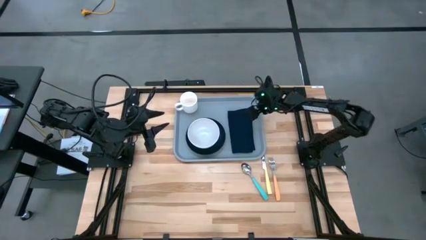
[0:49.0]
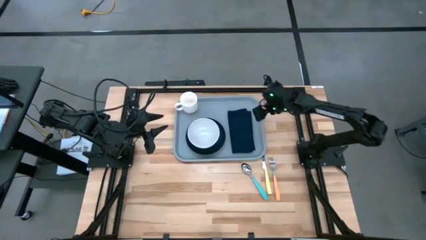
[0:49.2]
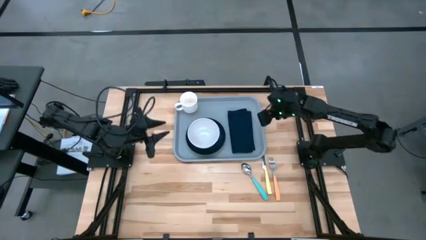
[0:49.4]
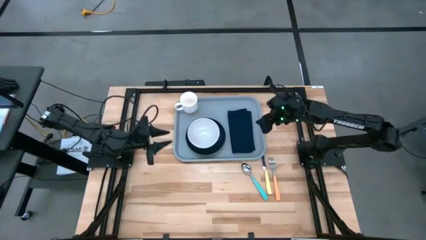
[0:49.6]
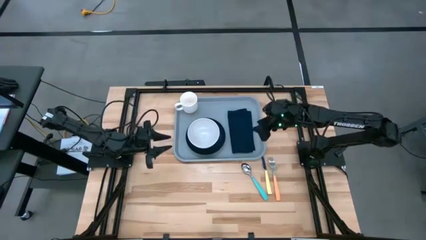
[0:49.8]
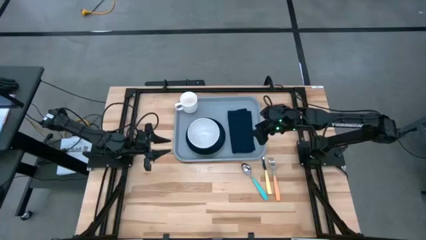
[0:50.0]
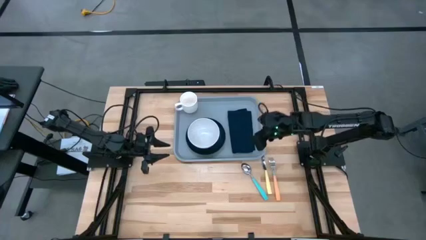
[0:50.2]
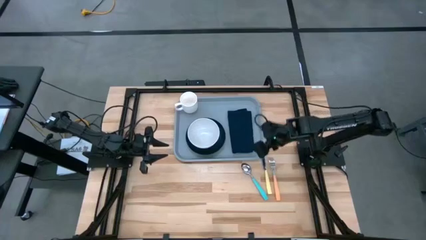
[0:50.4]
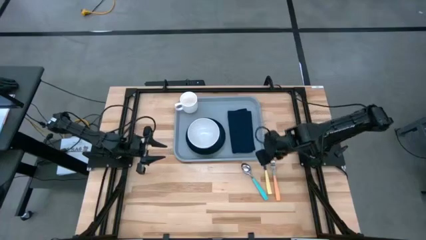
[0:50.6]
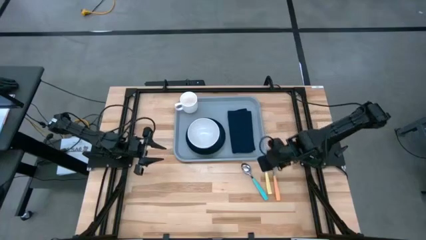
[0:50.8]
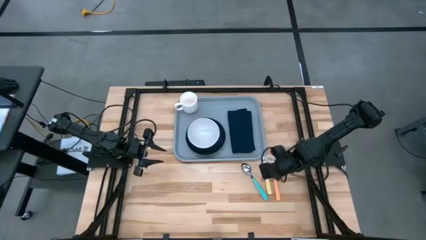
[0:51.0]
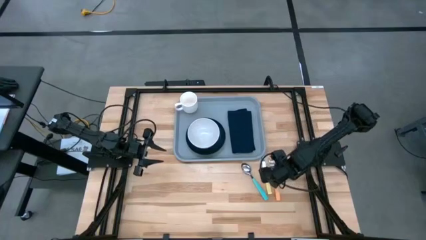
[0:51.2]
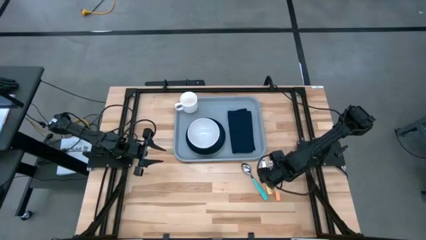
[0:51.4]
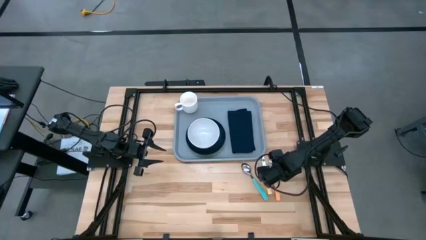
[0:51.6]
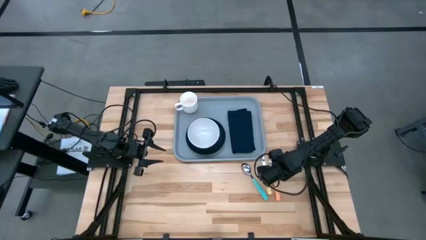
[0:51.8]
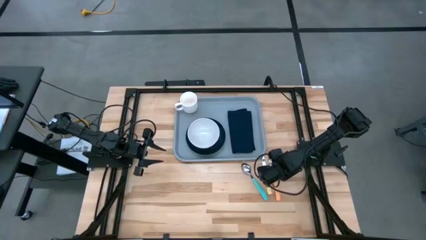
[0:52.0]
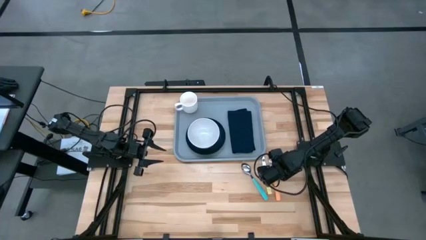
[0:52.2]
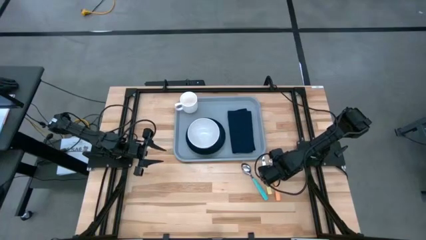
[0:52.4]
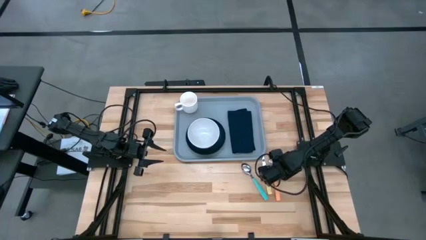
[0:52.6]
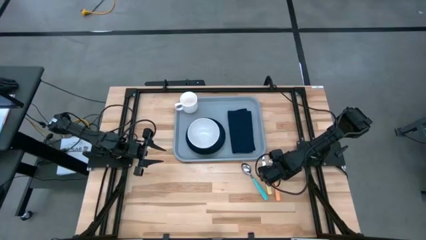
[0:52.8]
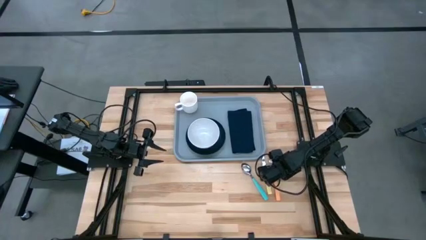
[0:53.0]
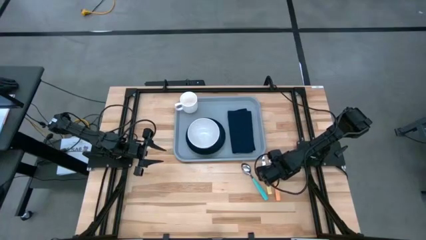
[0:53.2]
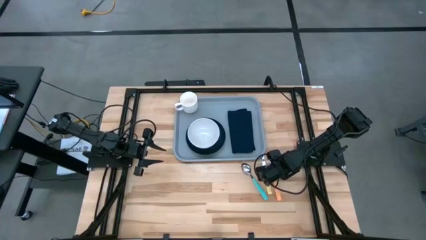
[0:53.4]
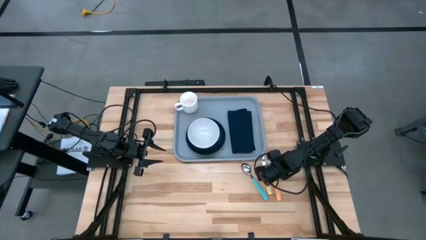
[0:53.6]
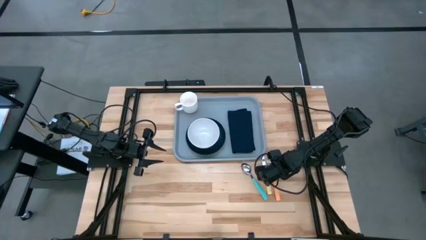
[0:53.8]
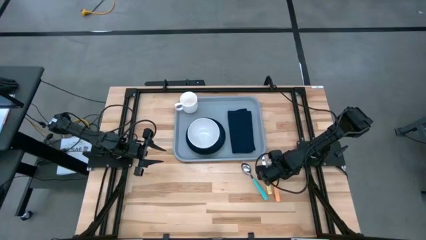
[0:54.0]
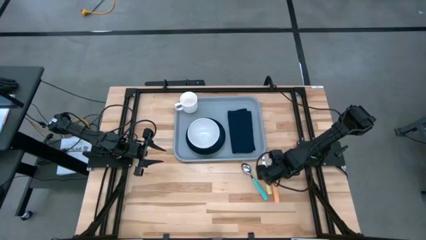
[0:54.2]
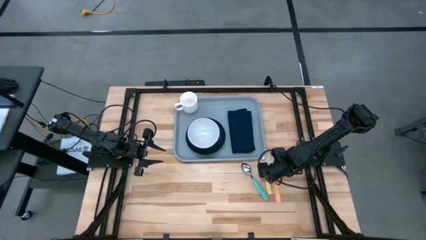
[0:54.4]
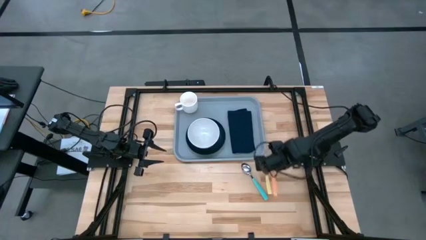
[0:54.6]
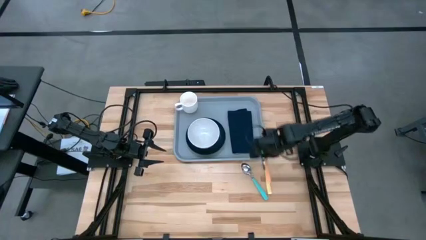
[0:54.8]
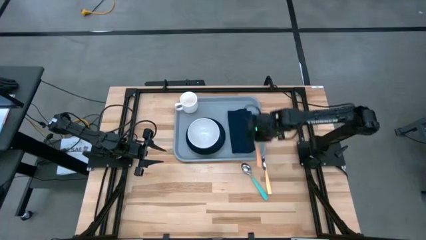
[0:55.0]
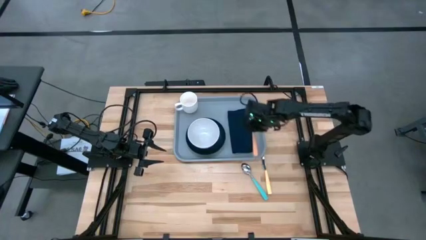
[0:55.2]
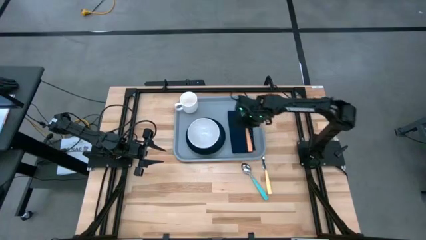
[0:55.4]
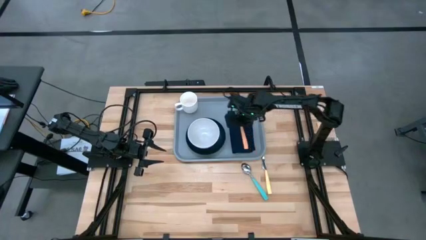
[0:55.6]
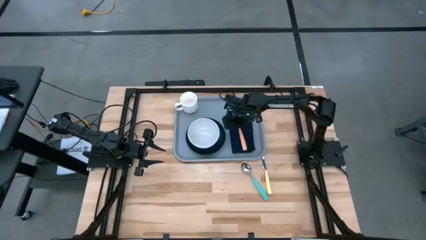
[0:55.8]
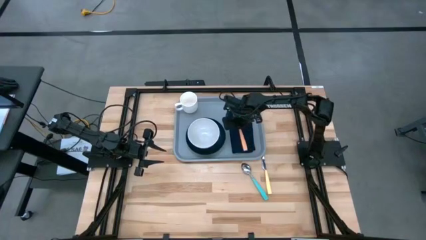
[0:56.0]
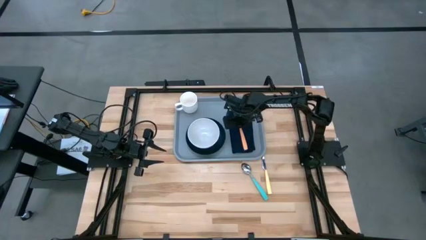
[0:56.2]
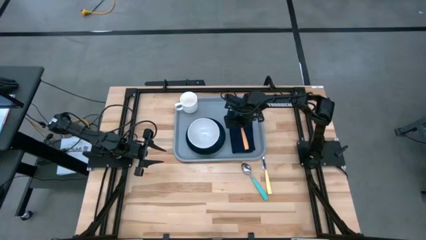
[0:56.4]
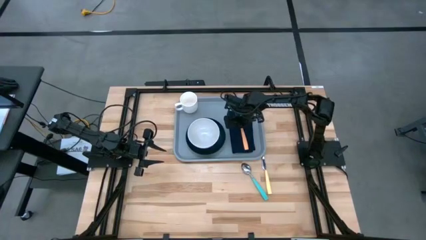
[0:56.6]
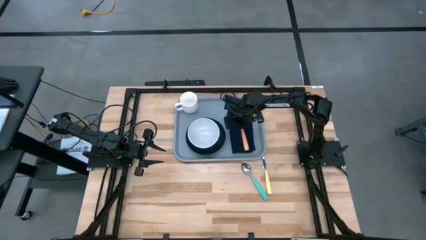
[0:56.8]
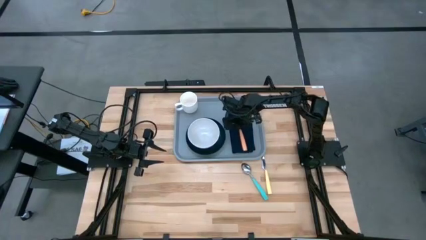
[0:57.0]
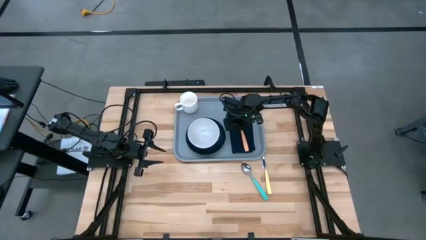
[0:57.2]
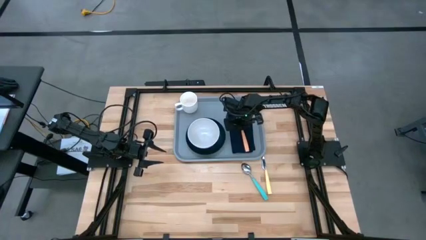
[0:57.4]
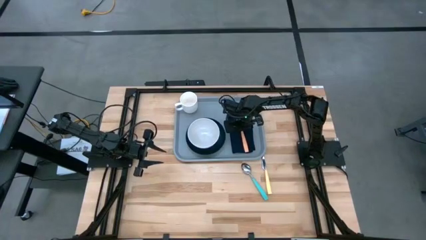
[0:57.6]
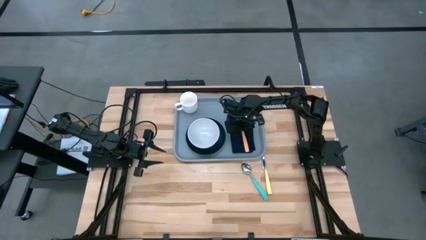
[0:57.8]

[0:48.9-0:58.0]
Task: Set up tray
Put the orange fork on the blue napkin

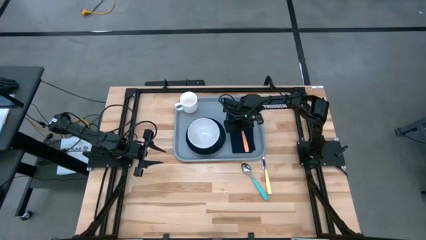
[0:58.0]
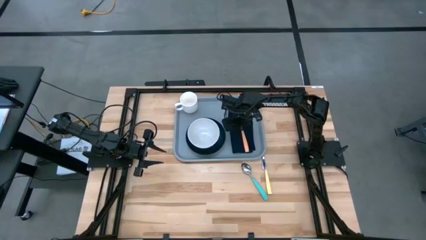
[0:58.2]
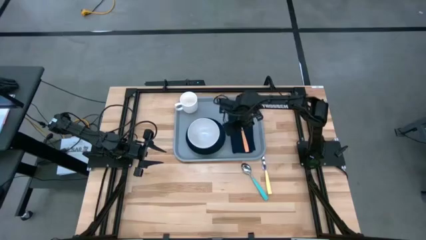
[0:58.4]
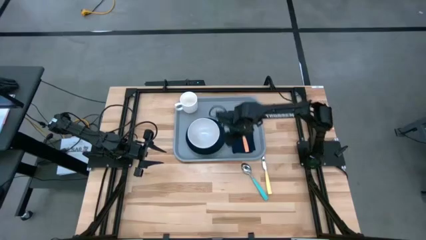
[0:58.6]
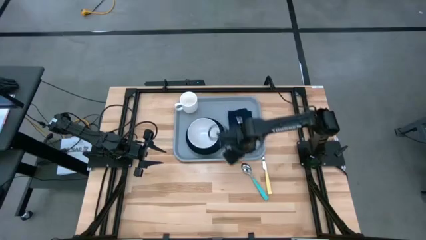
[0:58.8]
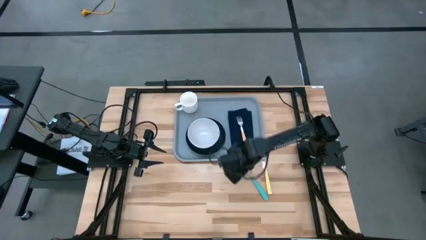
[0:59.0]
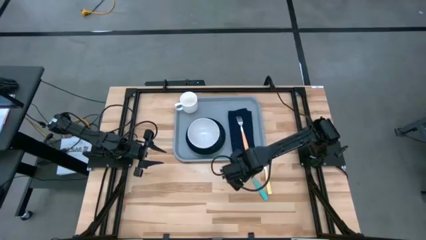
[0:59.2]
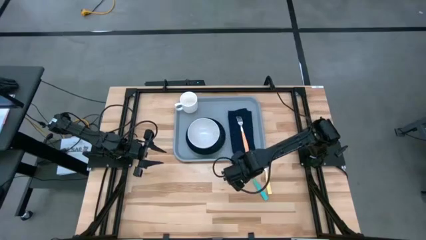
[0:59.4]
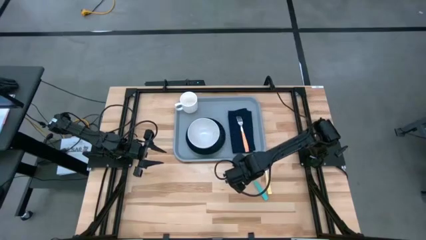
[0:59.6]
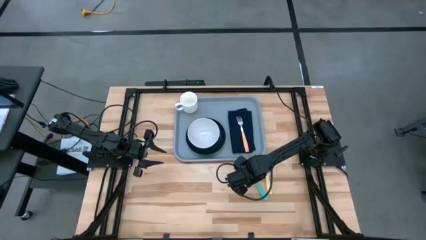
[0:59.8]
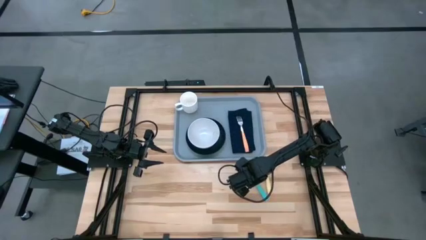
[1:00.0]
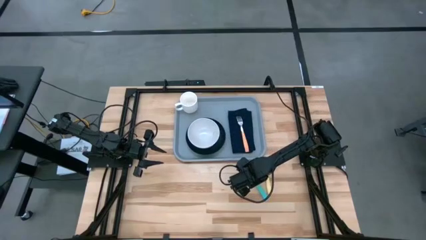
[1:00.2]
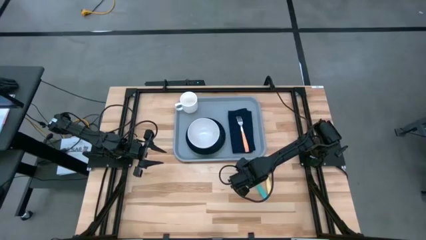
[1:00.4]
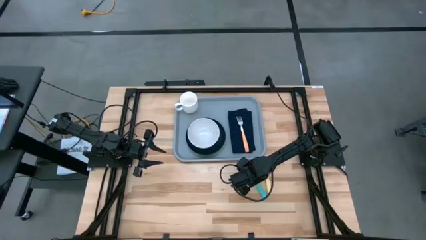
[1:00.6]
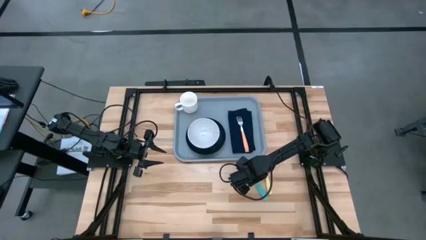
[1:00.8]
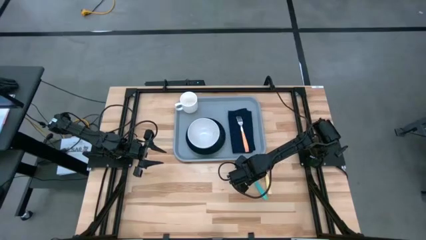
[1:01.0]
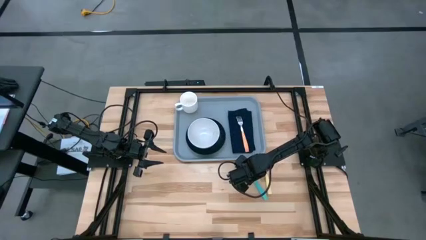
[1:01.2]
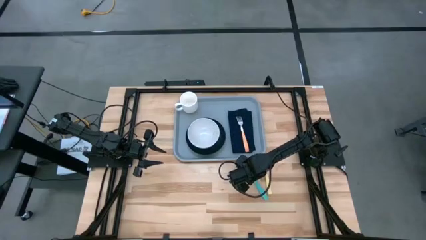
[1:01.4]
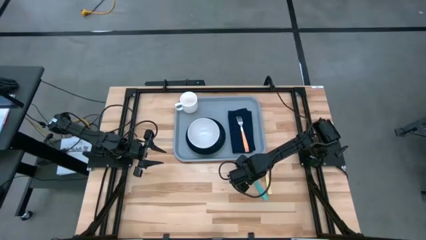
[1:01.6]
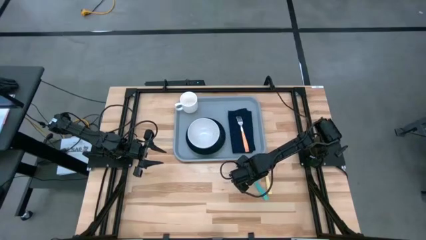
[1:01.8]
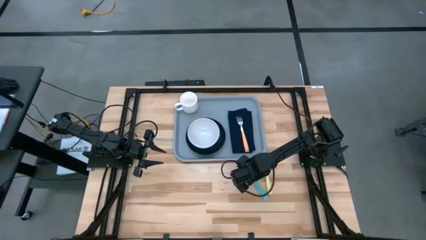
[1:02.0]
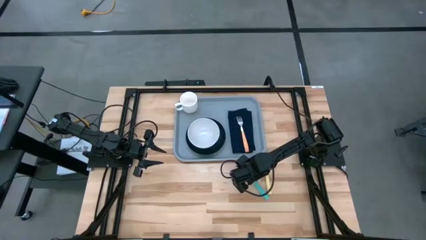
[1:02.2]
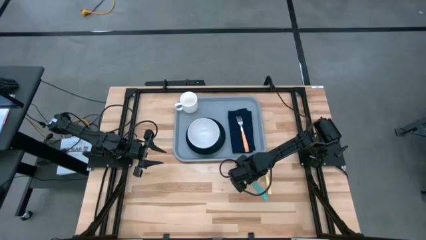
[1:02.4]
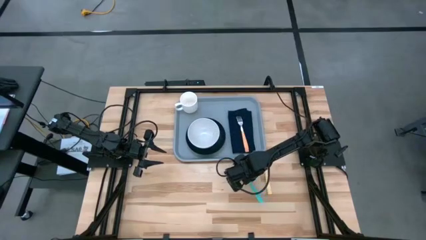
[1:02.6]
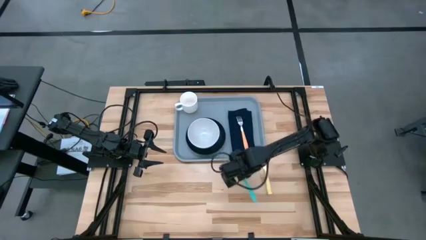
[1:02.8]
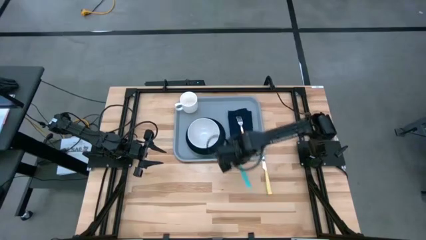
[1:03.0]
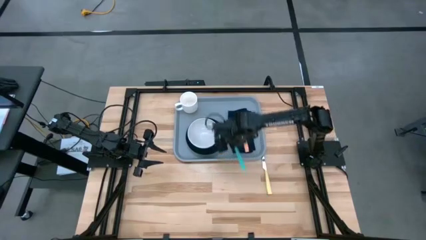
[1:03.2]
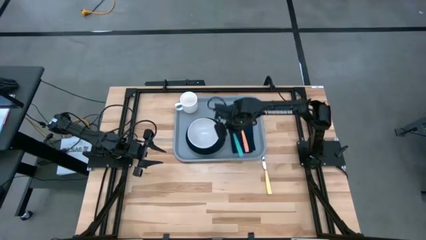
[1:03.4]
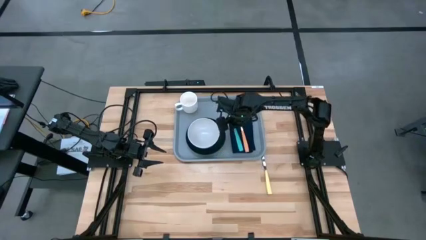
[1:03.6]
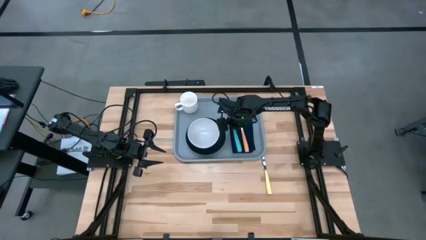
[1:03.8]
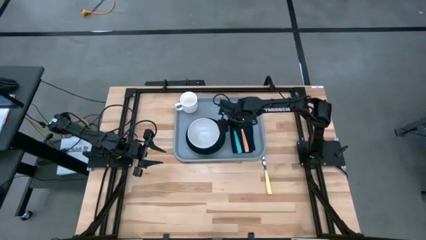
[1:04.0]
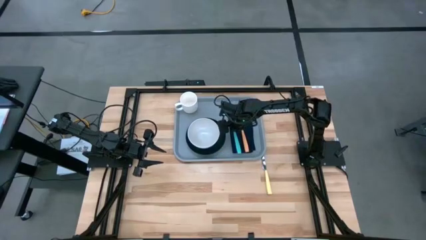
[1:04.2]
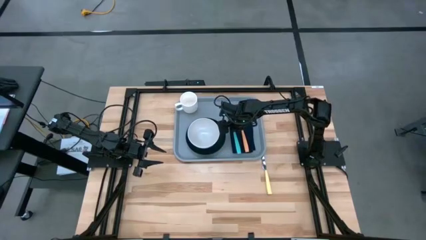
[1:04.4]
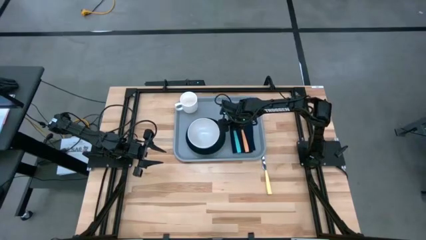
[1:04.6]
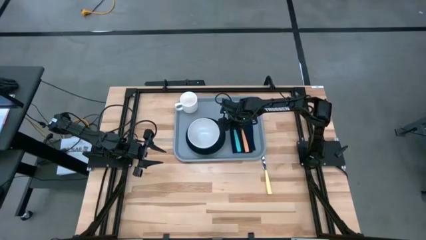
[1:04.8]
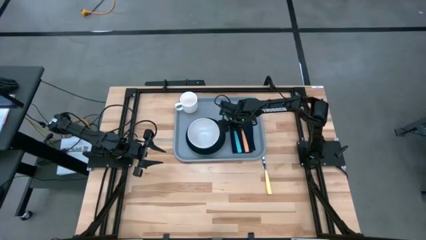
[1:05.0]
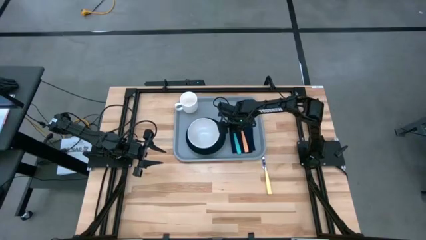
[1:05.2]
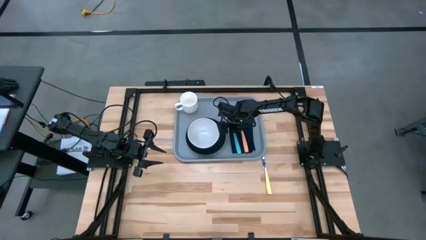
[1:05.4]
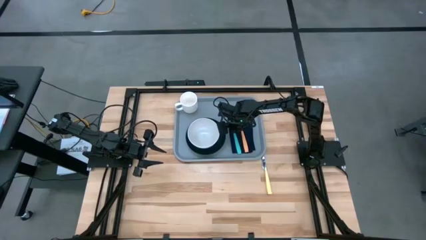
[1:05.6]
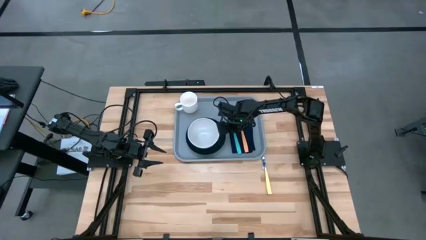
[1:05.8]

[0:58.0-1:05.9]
Put the green spoon on the blue napkin to the left of the orange fork
